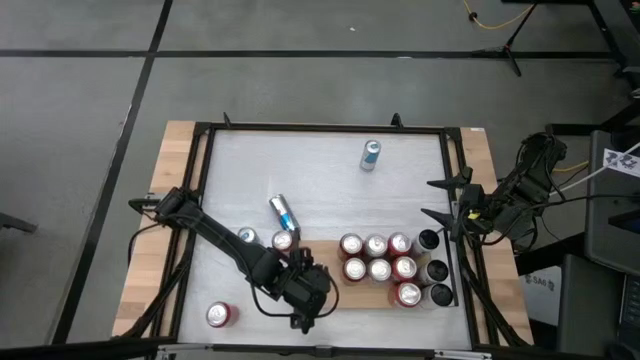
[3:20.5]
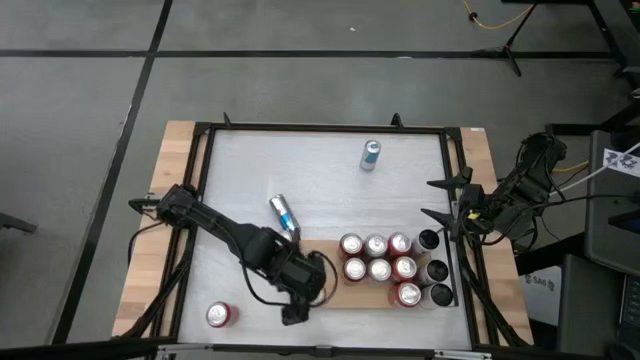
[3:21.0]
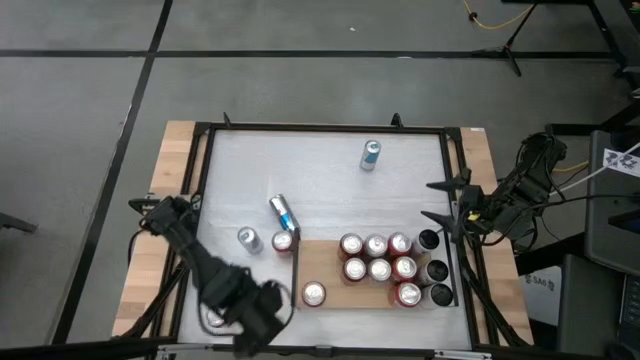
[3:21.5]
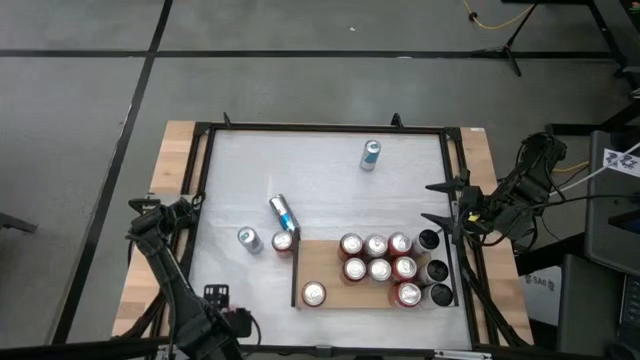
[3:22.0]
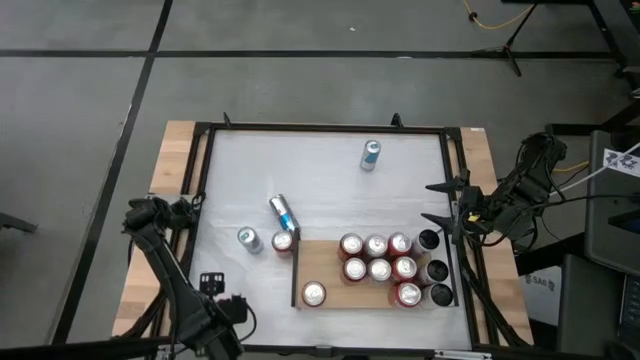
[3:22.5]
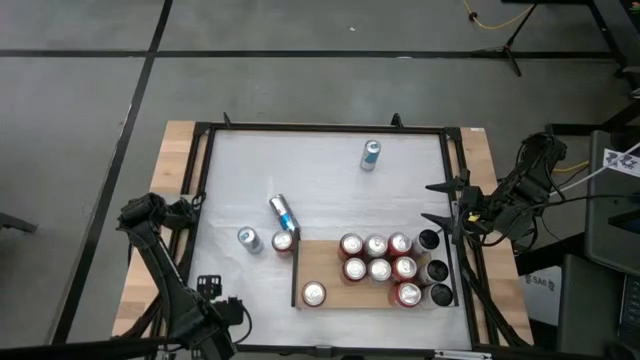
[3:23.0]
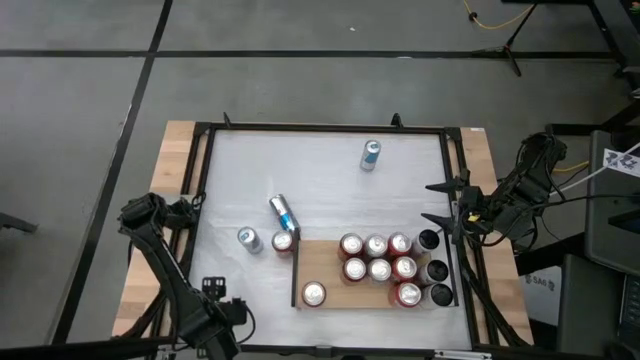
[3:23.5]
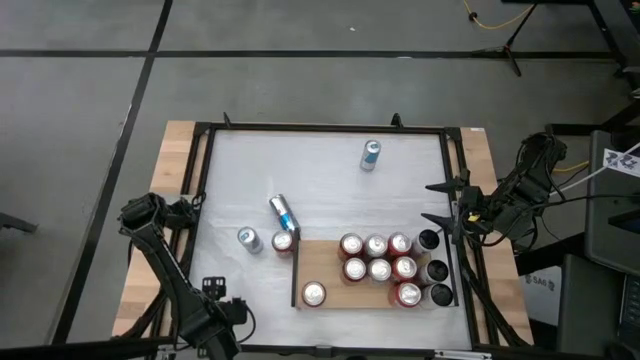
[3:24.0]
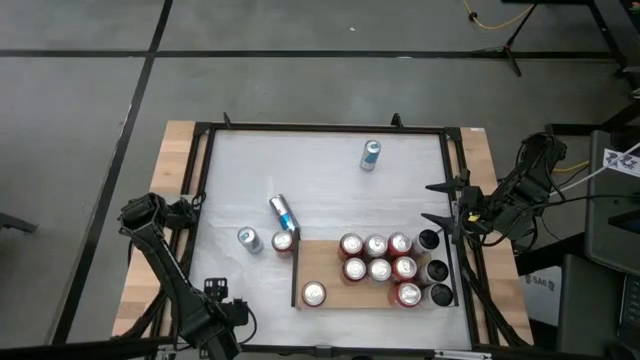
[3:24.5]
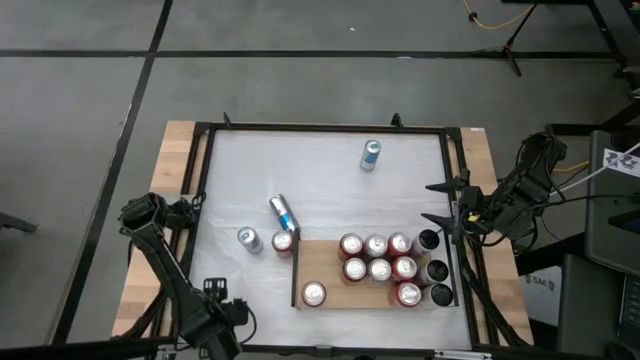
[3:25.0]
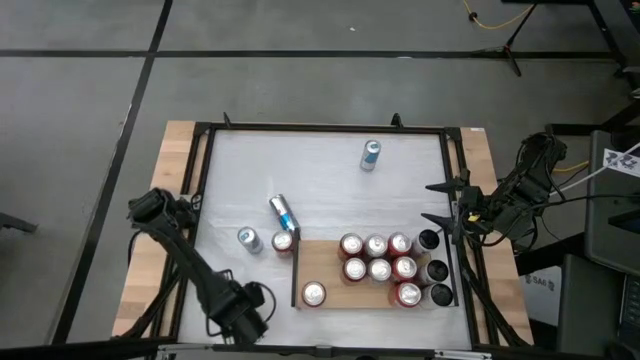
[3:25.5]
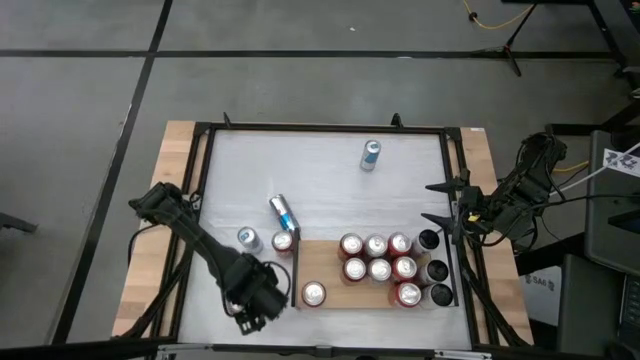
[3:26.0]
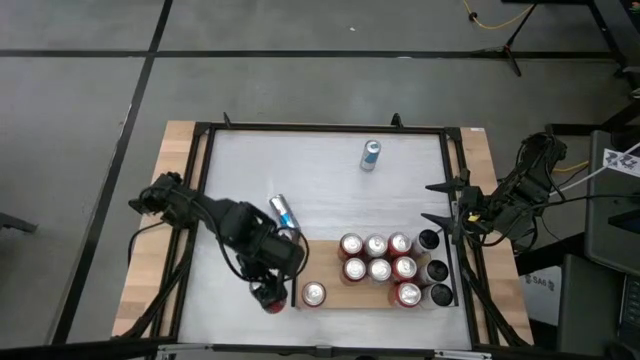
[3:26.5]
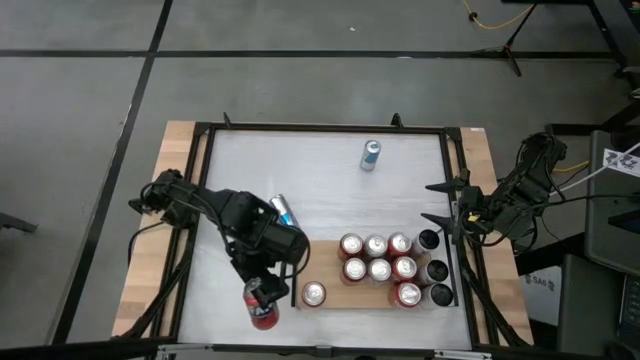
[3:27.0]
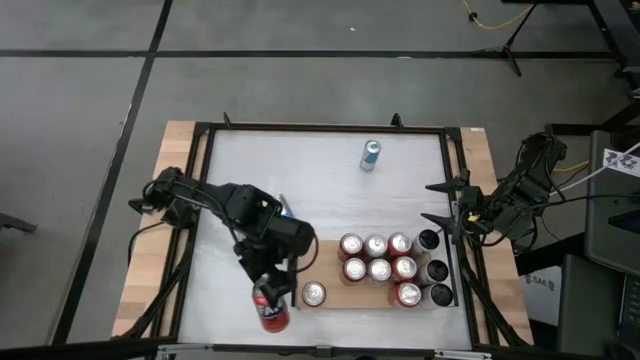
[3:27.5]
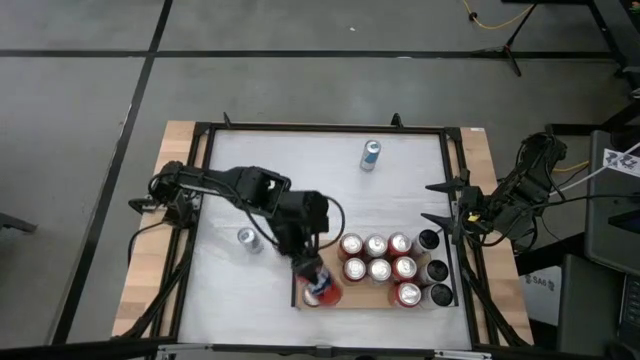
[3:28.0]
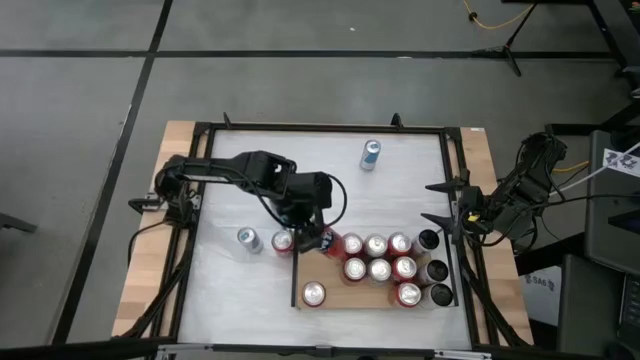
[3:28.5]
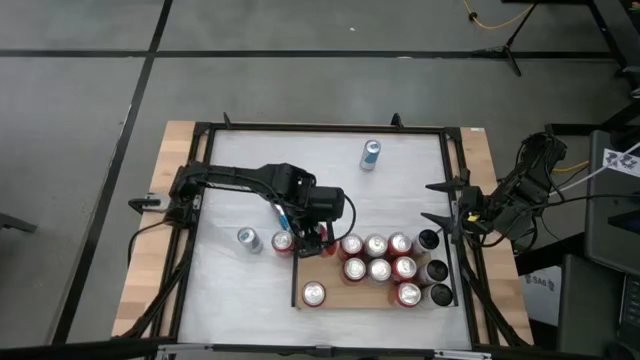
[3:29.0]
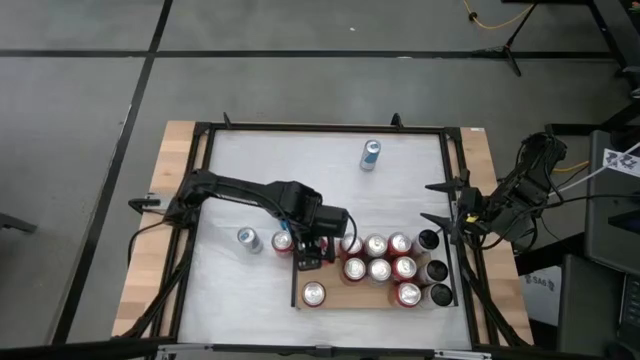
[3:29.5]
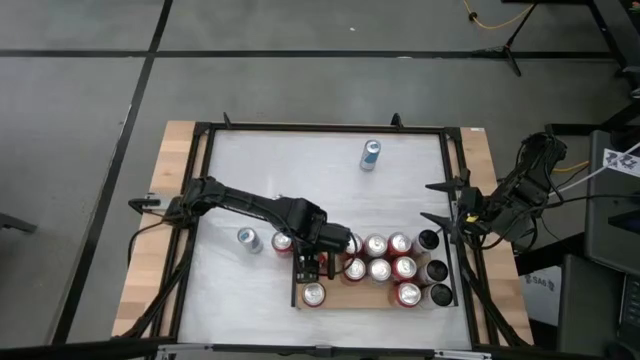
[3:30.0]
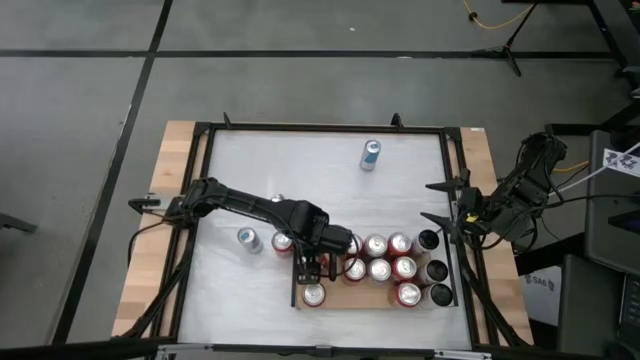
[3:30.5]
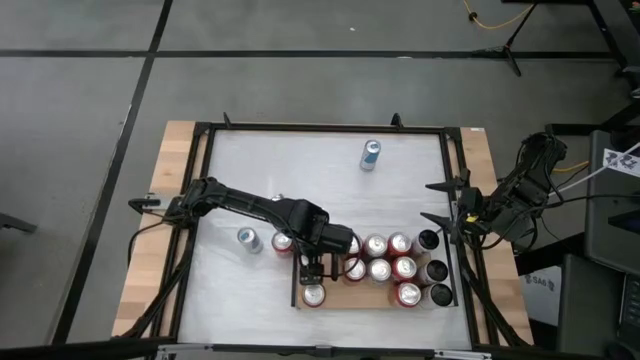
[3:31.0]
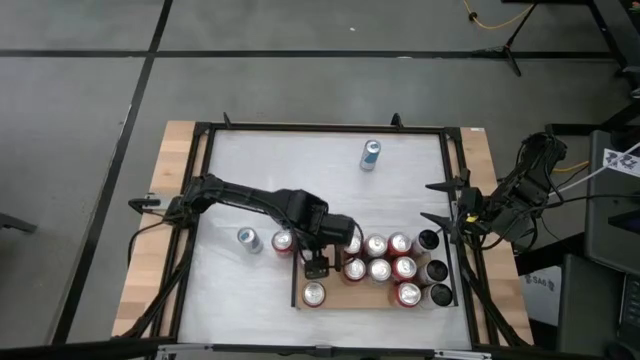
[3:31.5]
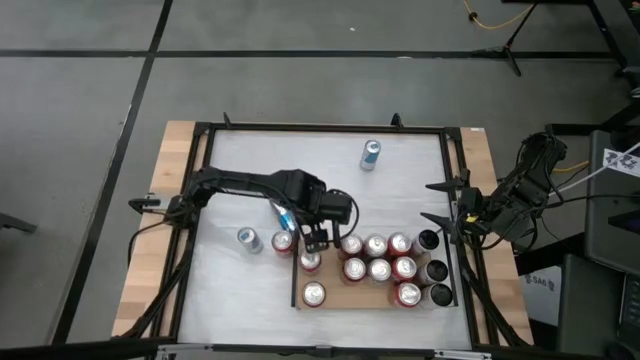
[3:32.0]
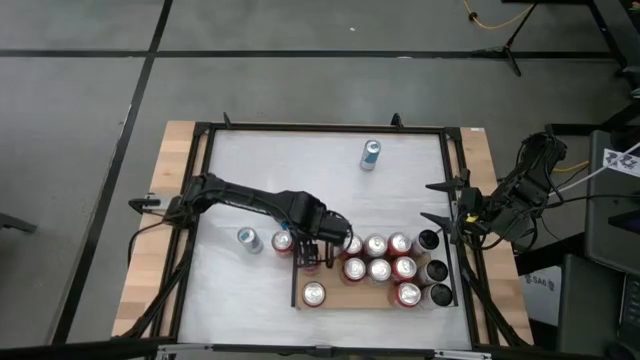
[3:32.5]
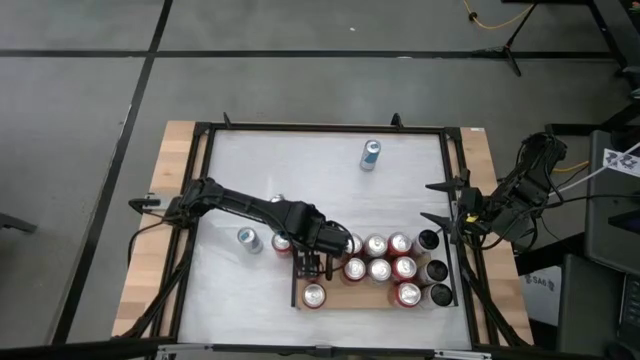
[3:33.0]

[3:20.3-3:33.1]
Task: Place canned beverage on shelf
Put the bottom left orange soda can on the shelf

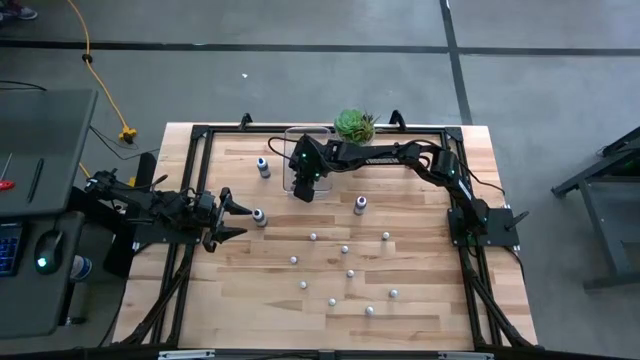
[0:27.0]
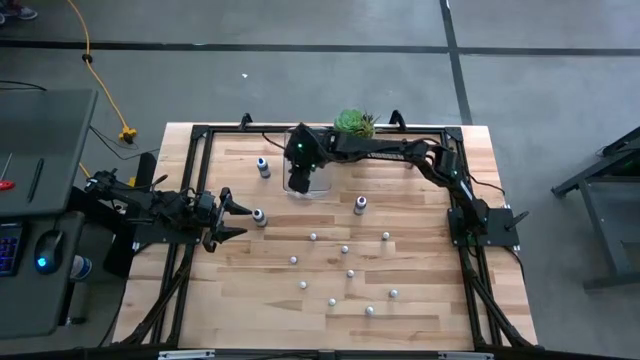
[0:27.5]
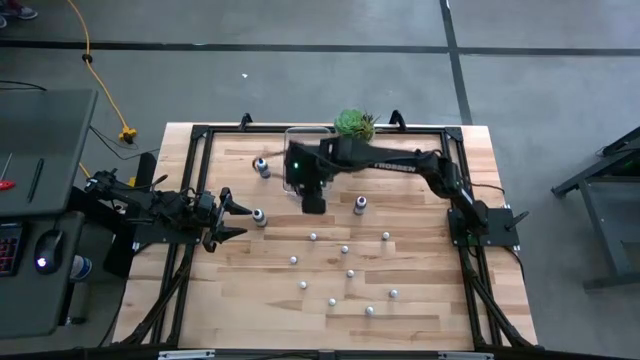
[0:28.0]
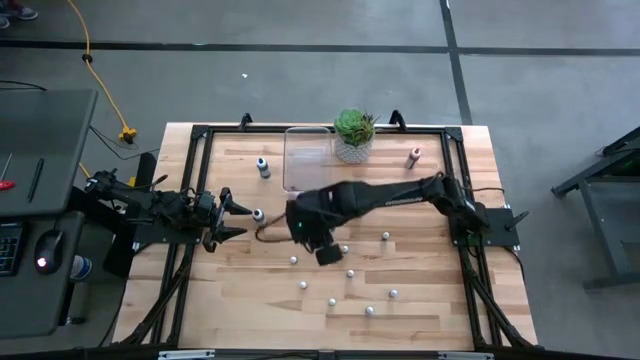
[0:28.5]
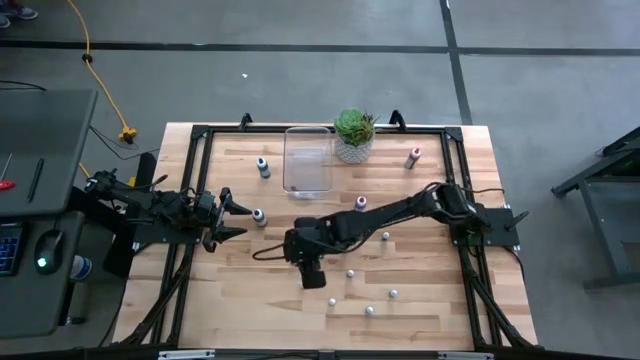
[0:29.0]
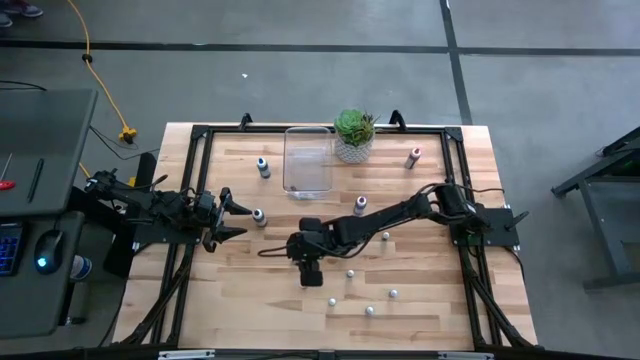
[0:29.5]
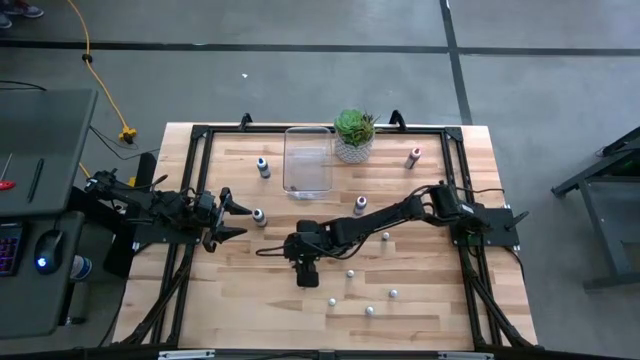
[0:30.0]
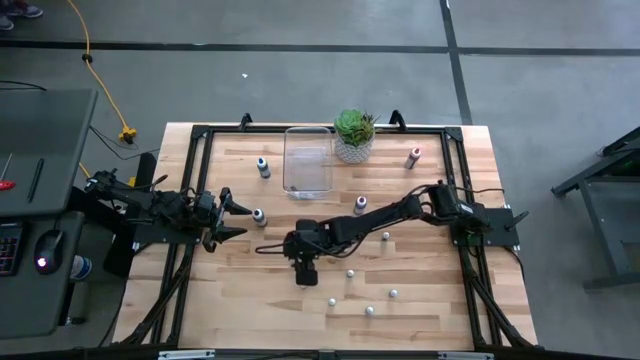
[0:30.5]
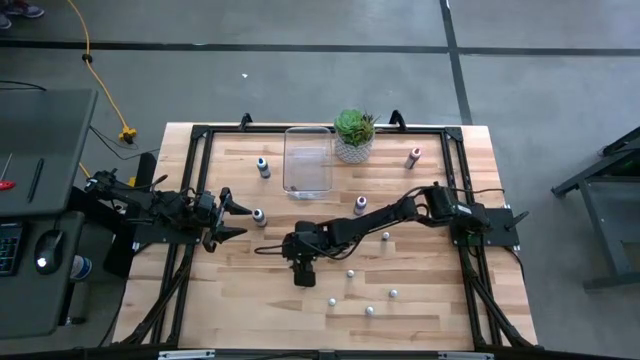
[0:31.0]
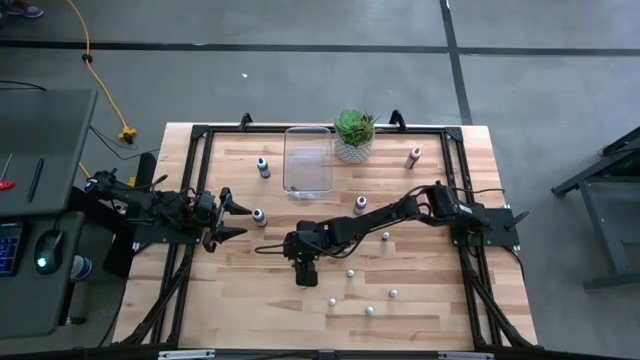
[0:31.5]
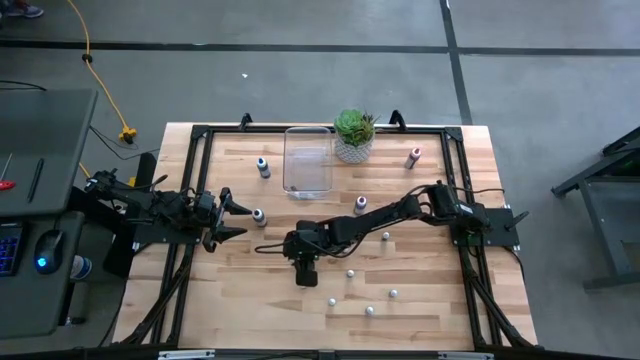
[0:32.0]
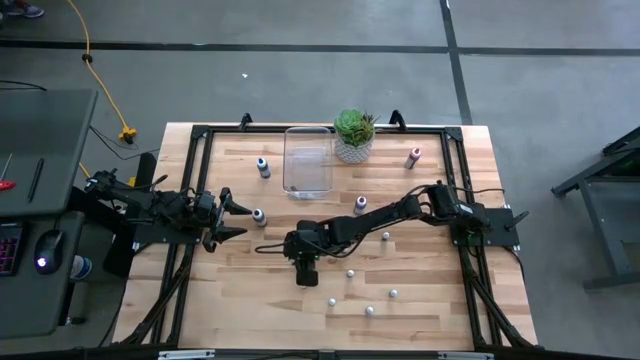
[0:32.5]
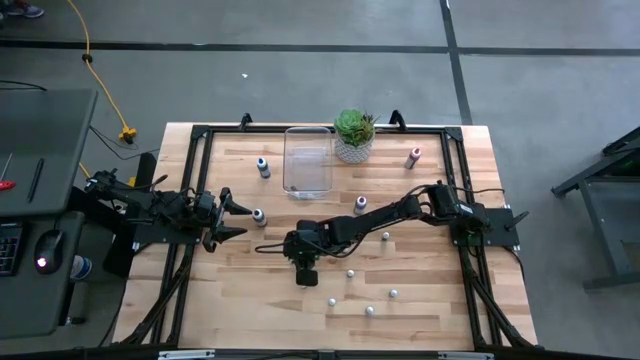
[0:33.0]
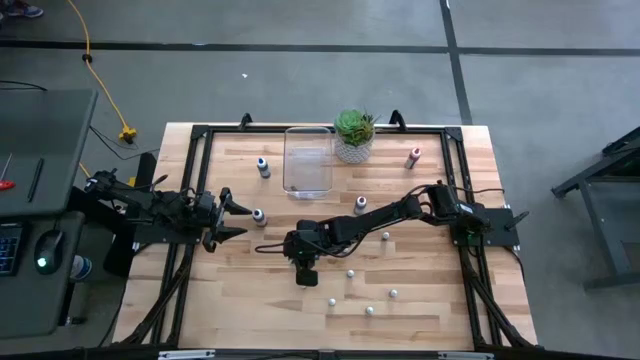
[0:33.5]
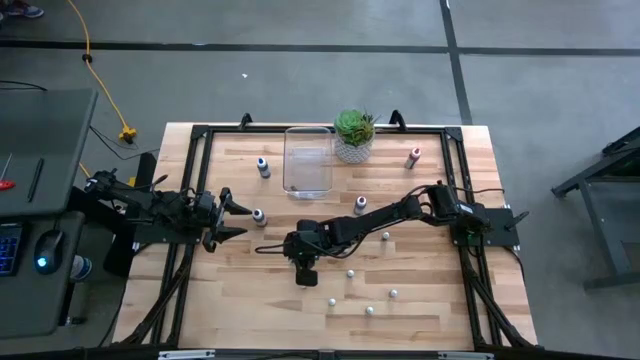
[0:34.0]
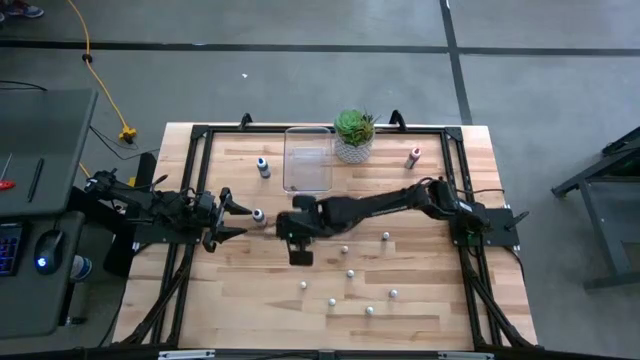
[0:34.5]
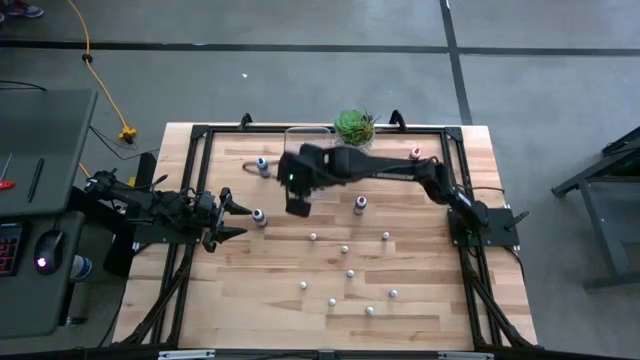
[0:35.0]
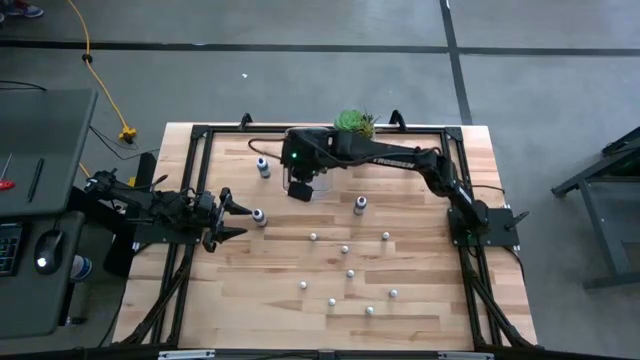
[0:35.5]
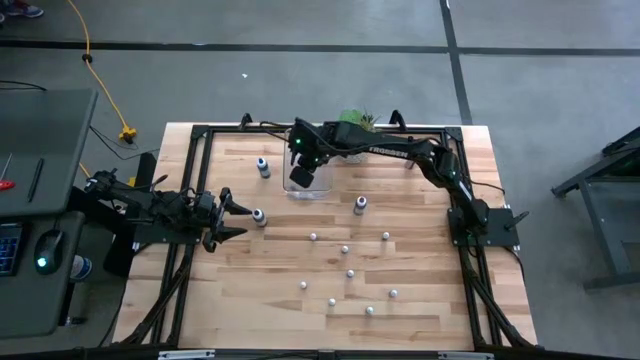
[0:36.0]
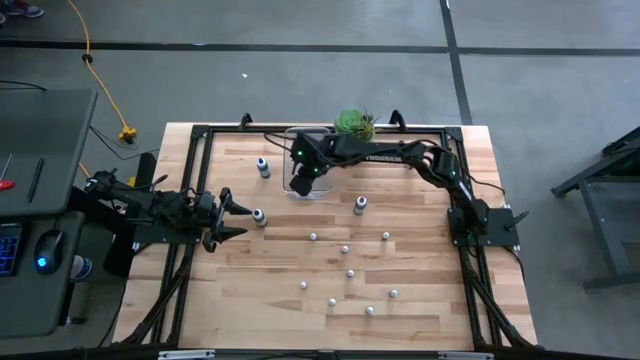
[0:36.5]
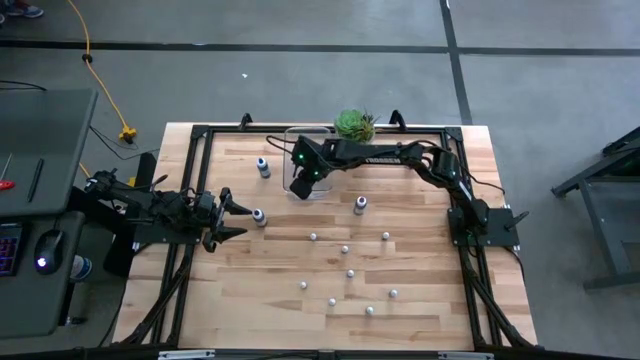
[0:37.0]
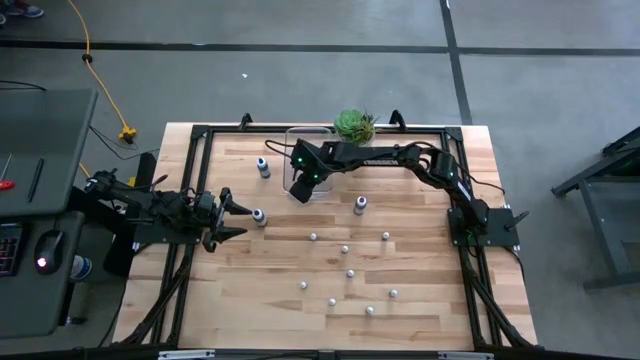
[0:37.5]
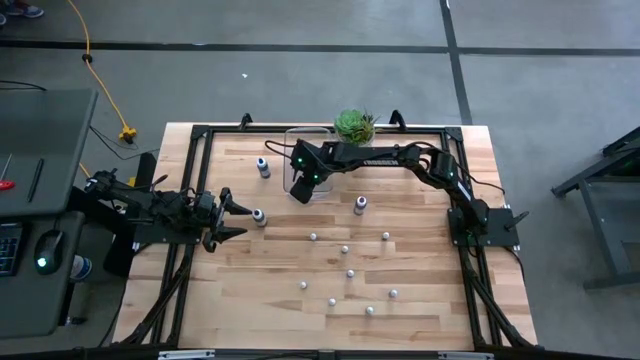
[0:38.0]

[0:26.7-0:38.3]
Task: Pick & Place food coloring
Put the small orange food coloring bottle into the transparent bin
